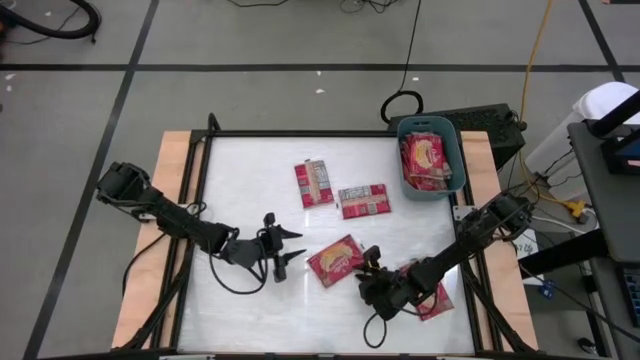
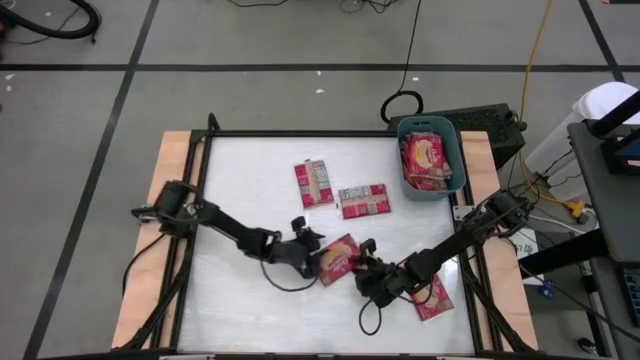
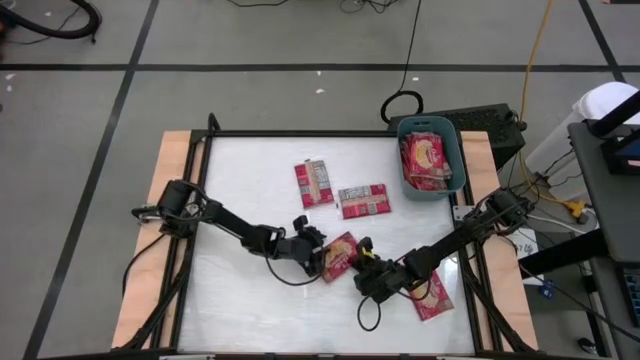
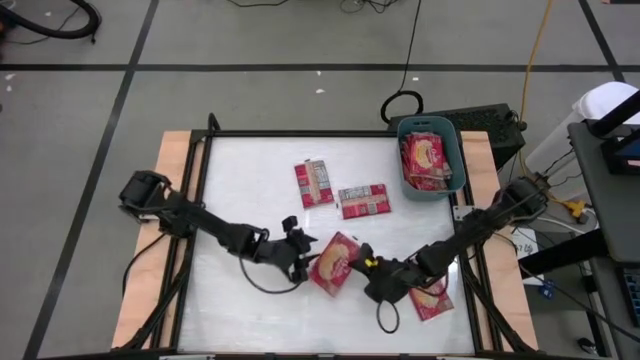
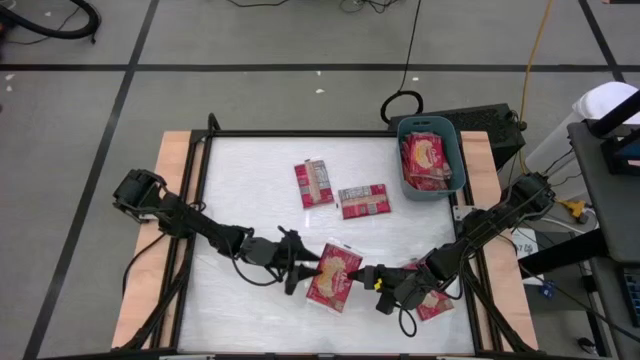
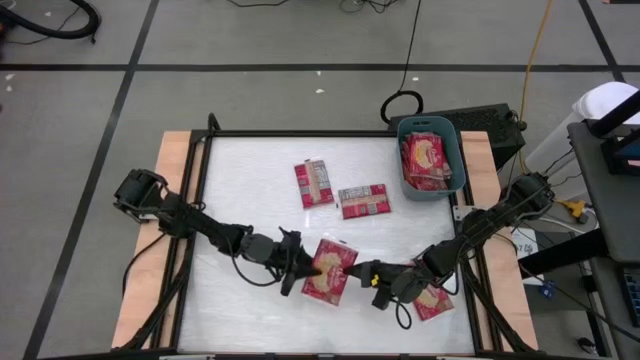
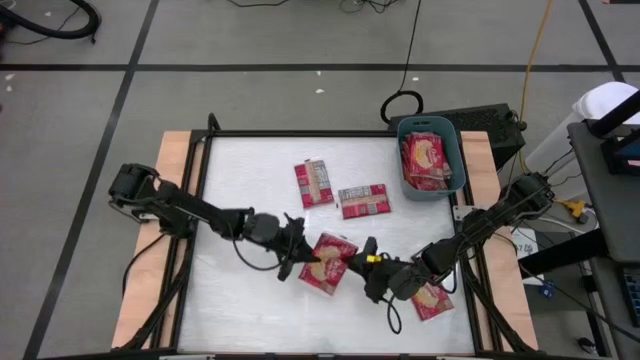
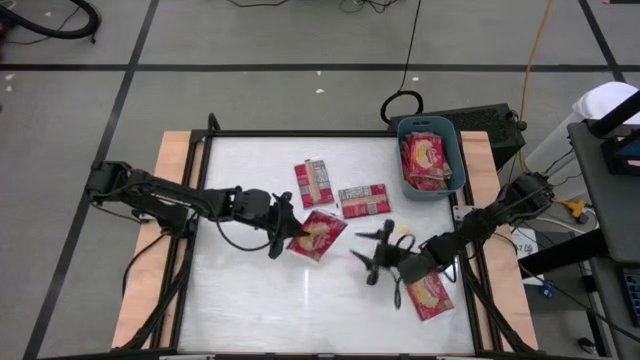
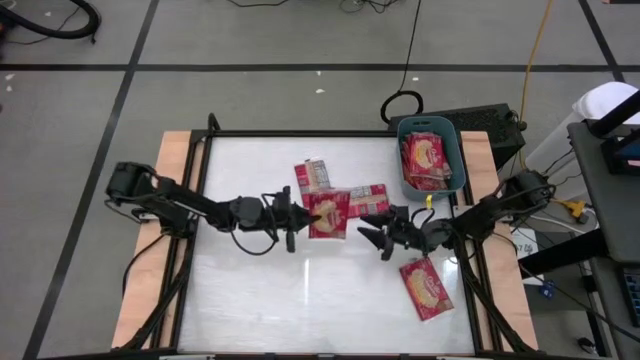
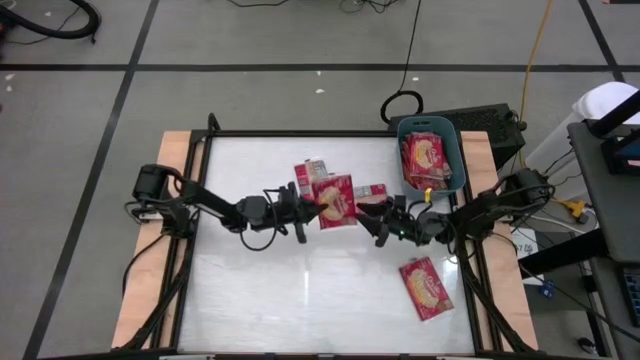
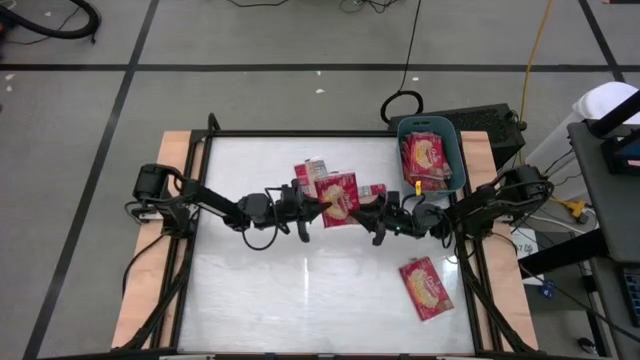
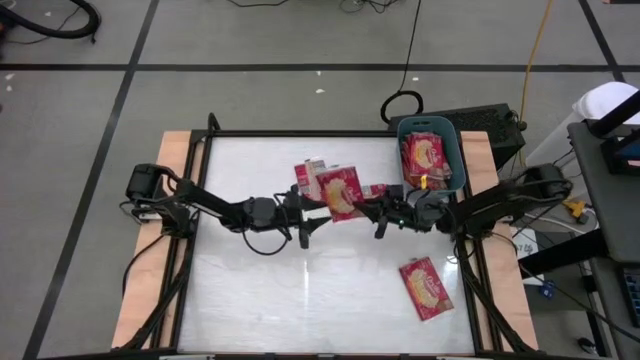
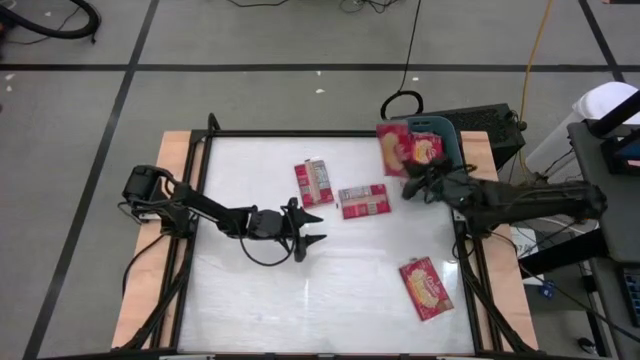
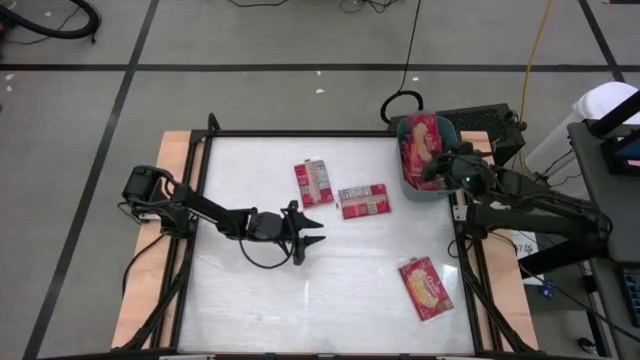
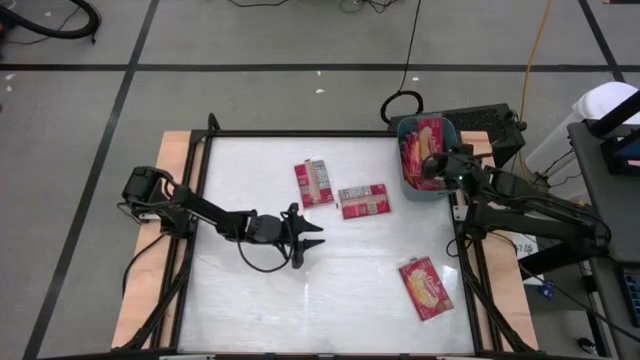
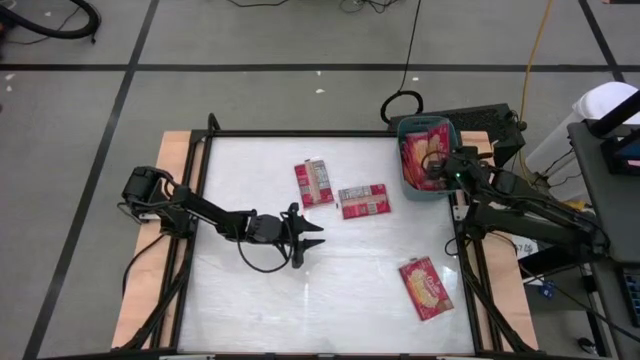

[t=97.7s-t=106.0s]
Task: Sort popcorn bags into baskets
Put the red popcorn bag into the blue bin

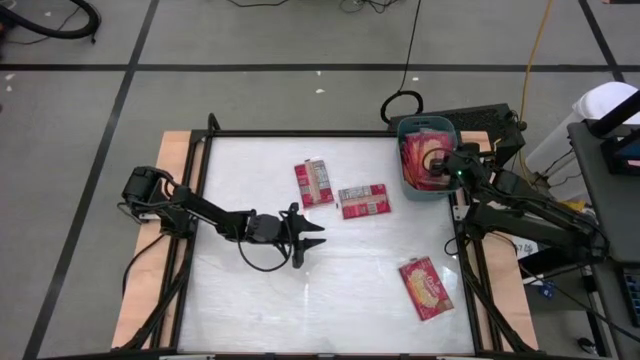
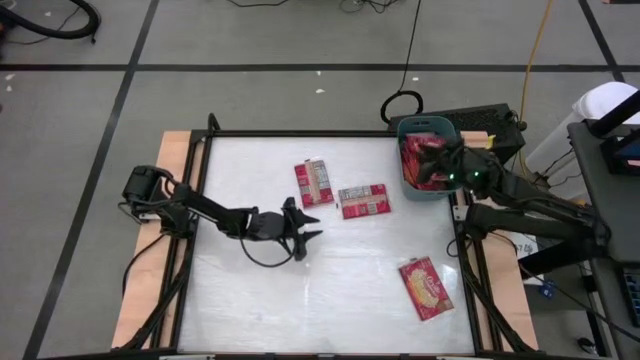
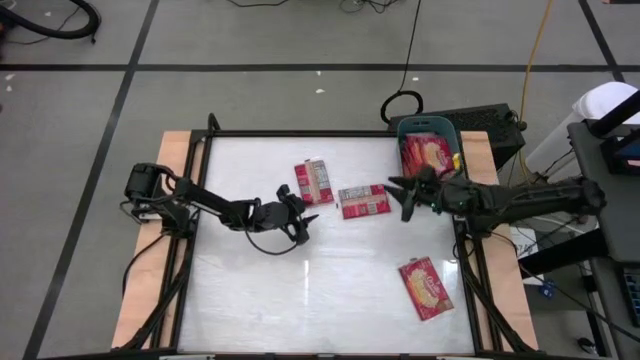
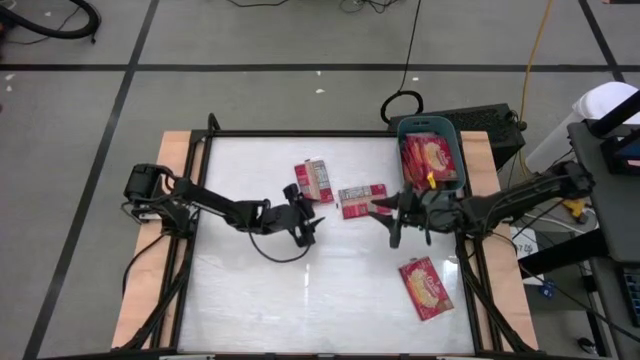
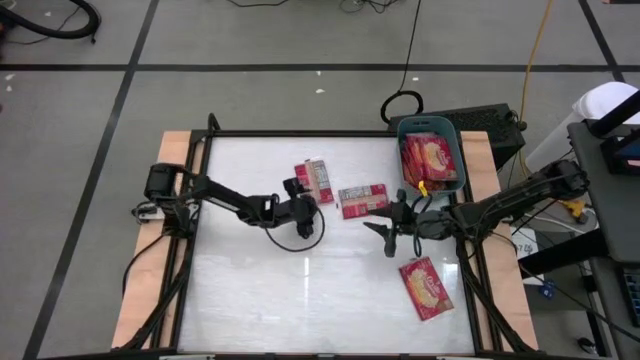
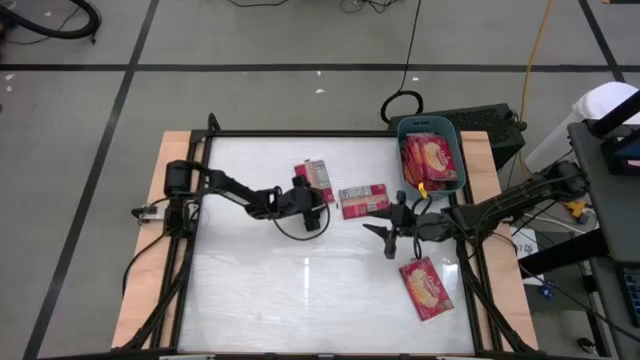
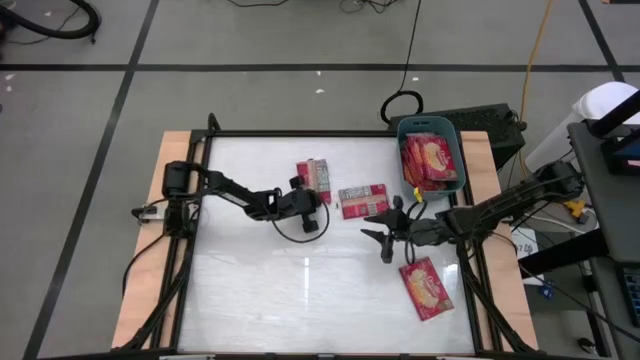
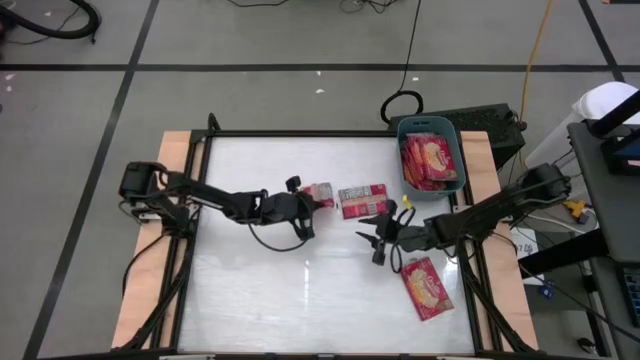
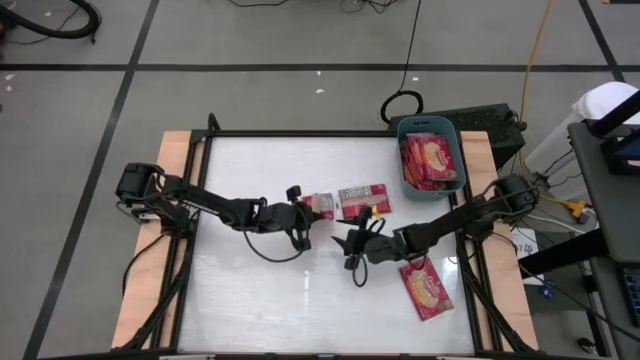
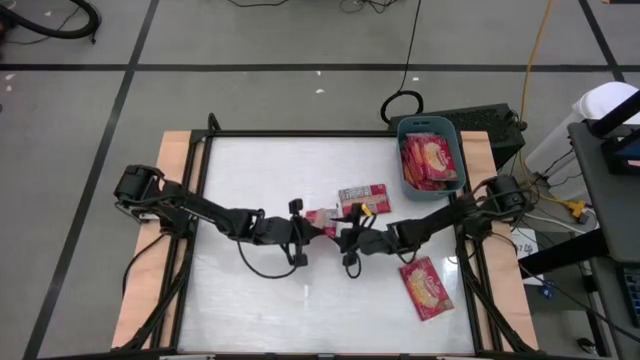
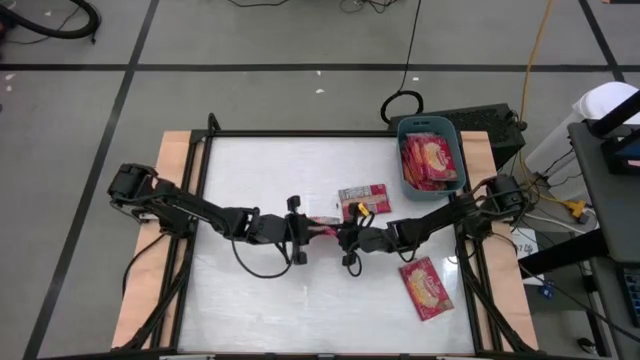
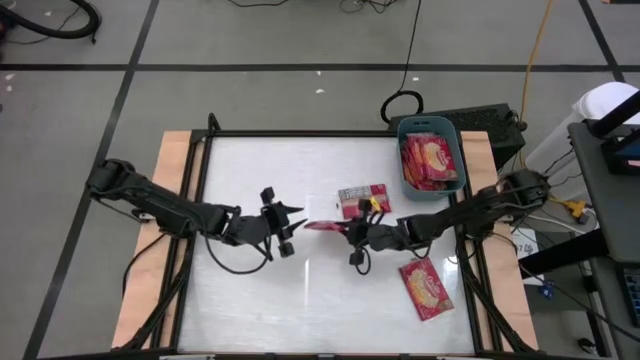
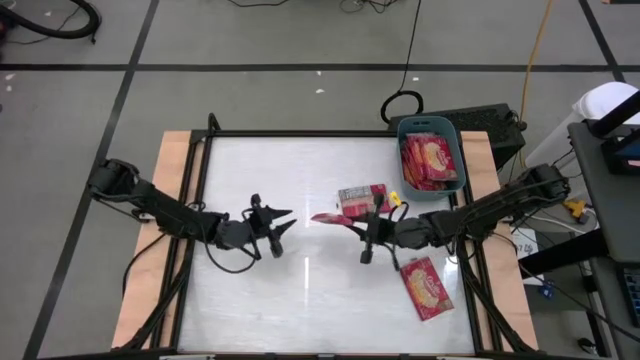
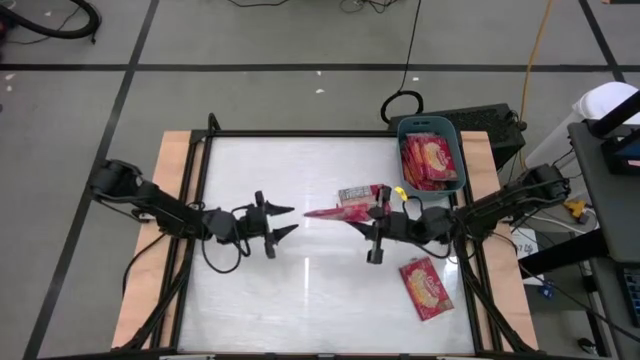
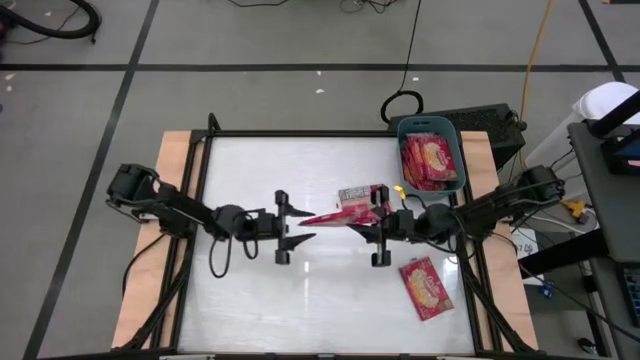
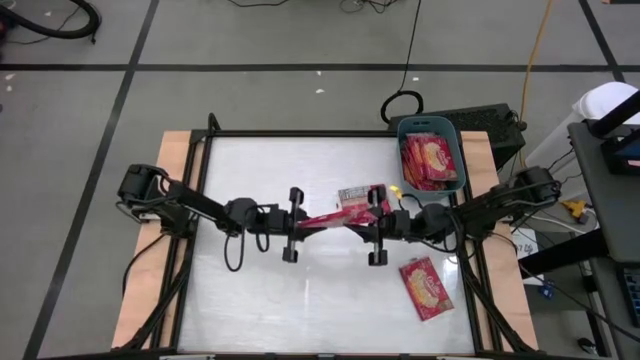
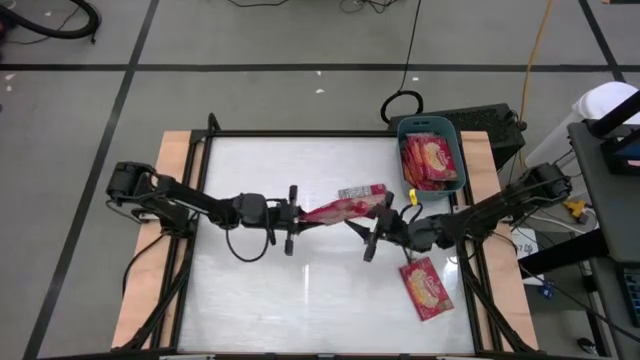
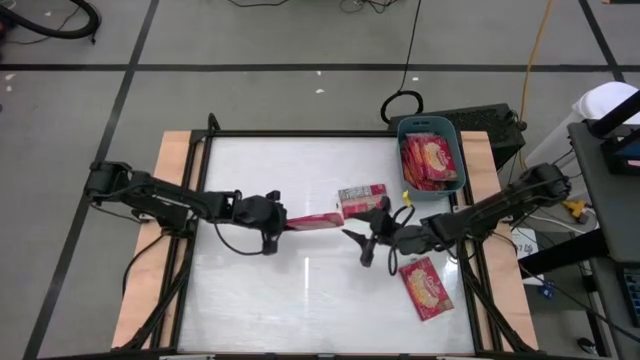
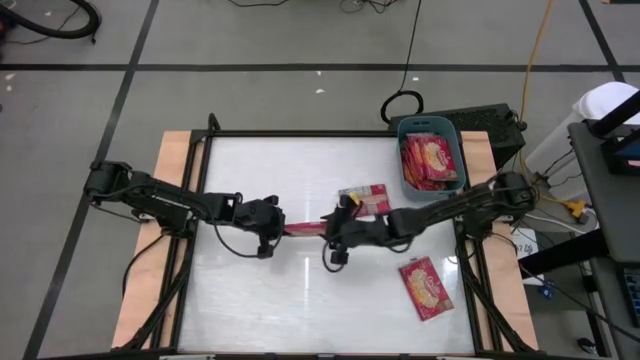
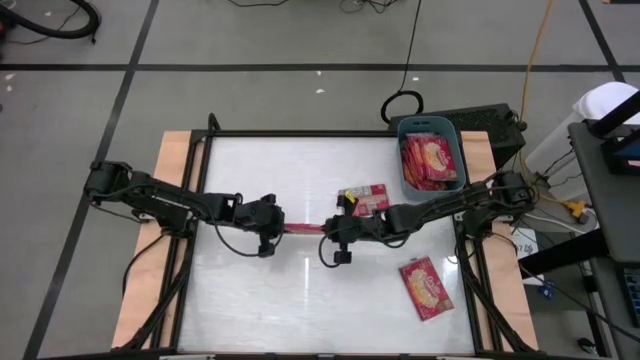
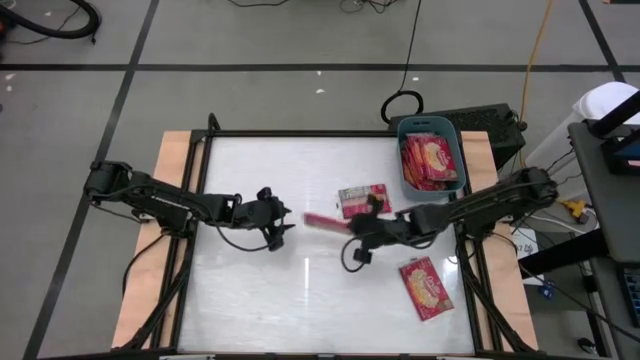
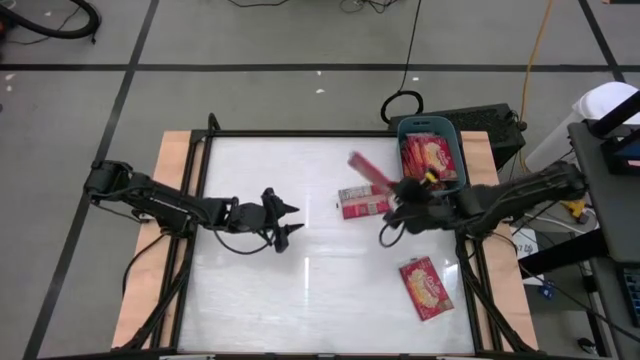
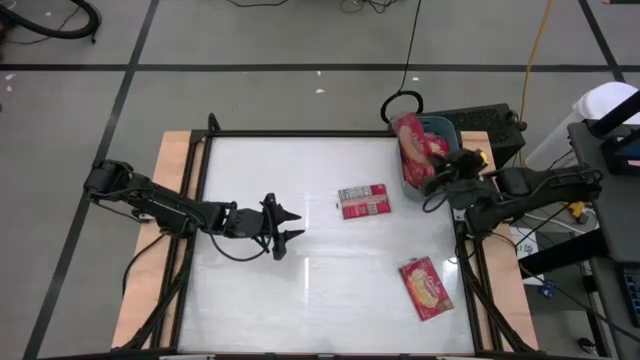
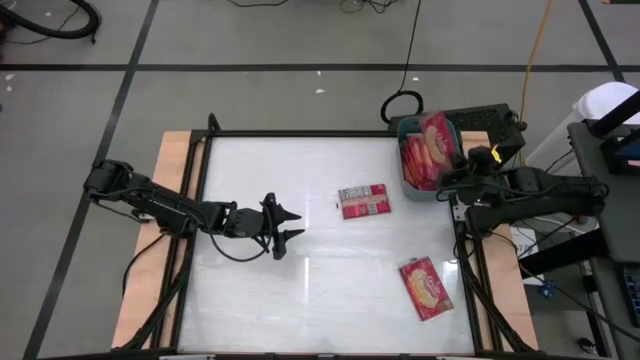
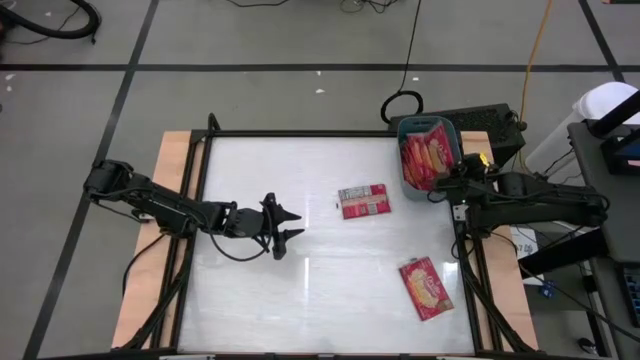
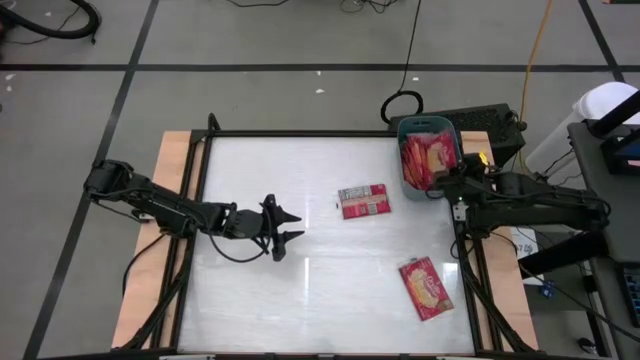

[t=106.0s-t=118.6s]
Put the red popcorn bag into the blue bin
